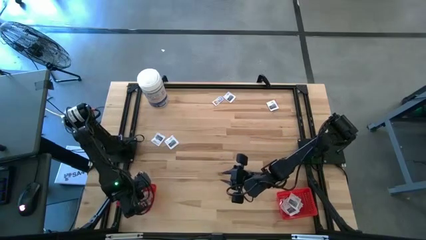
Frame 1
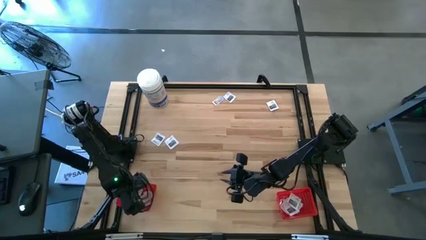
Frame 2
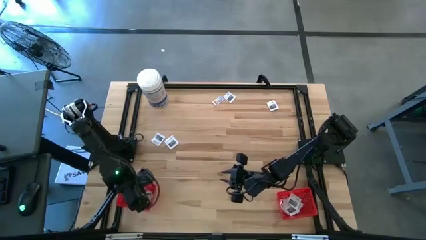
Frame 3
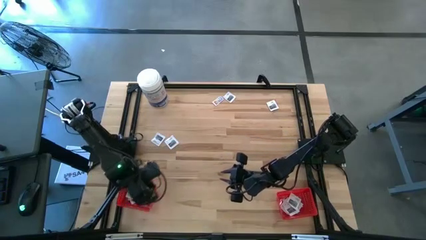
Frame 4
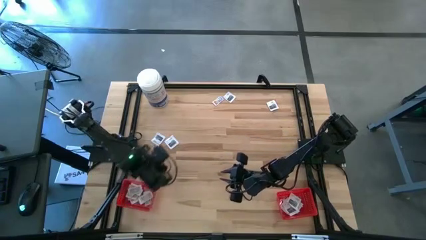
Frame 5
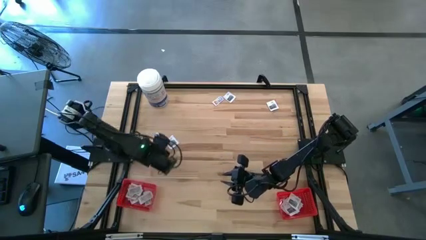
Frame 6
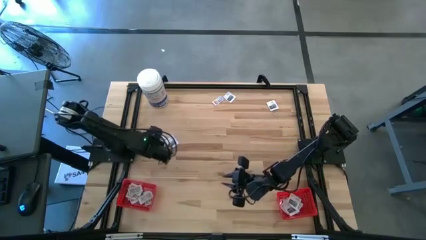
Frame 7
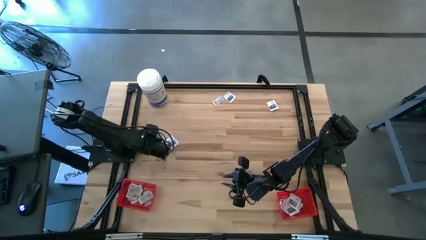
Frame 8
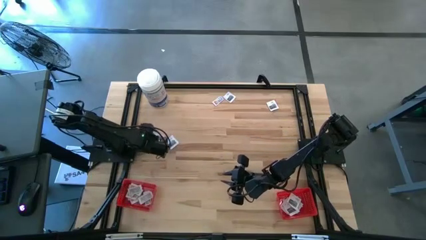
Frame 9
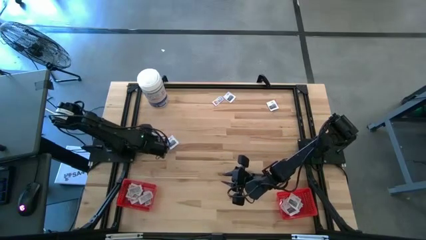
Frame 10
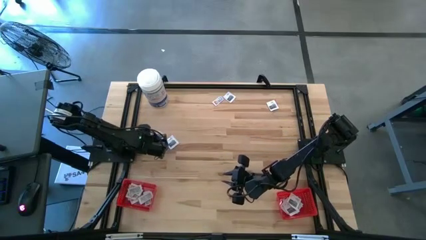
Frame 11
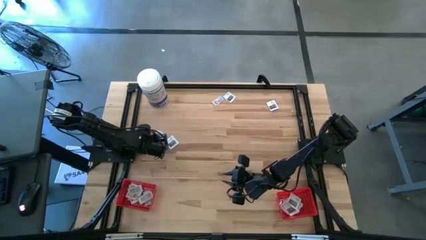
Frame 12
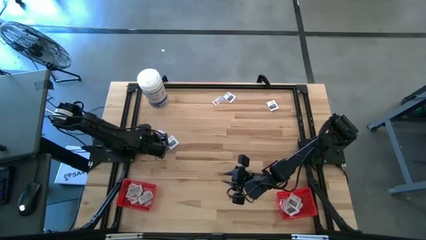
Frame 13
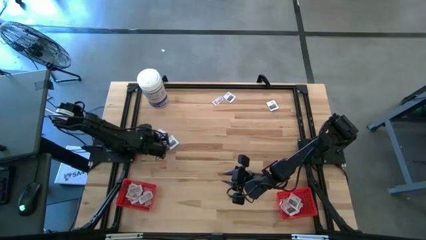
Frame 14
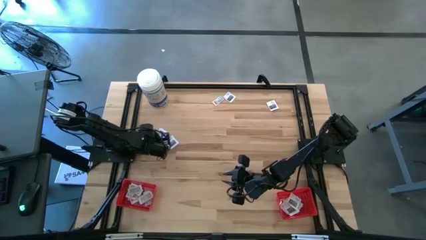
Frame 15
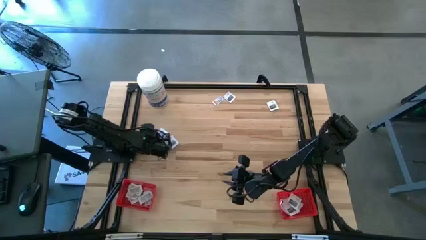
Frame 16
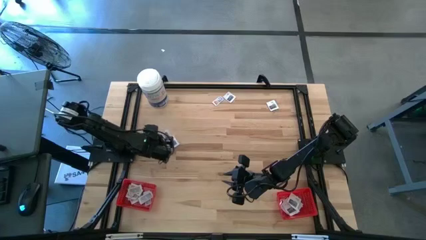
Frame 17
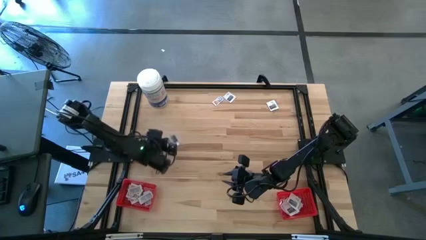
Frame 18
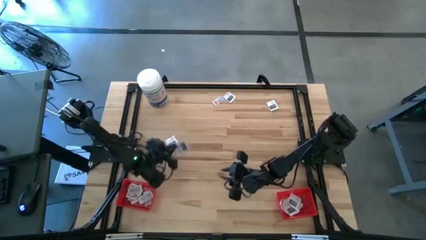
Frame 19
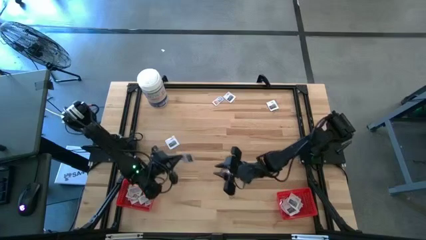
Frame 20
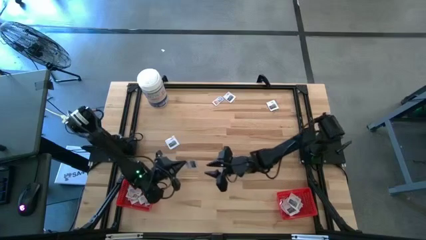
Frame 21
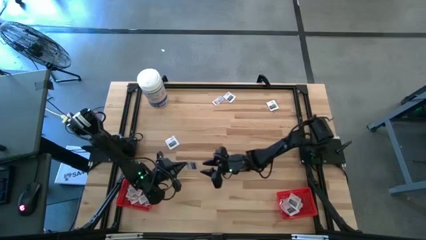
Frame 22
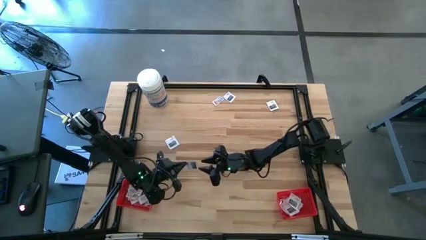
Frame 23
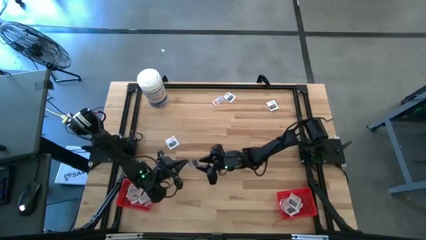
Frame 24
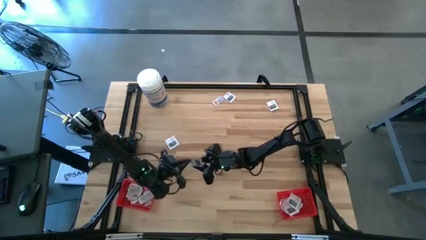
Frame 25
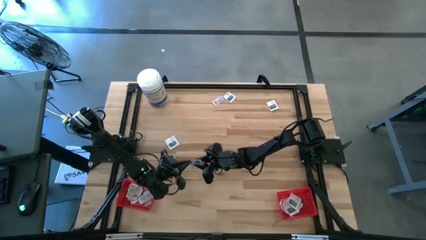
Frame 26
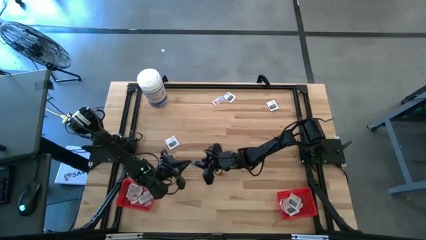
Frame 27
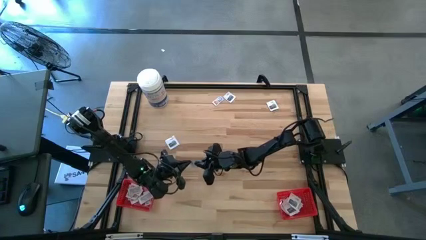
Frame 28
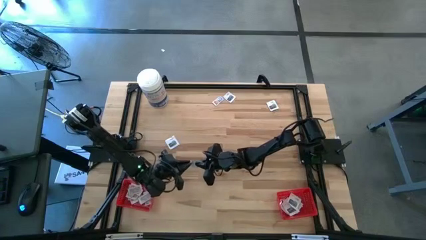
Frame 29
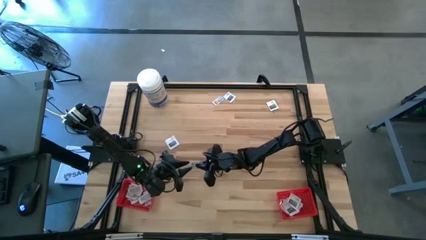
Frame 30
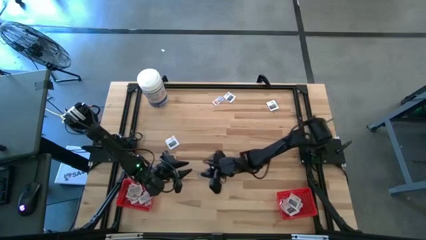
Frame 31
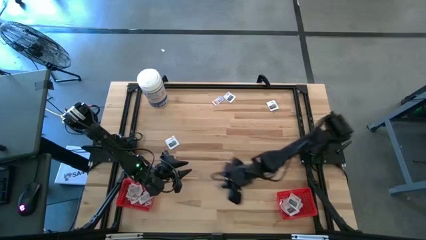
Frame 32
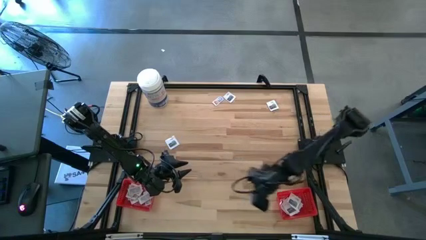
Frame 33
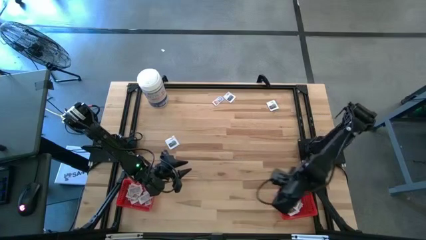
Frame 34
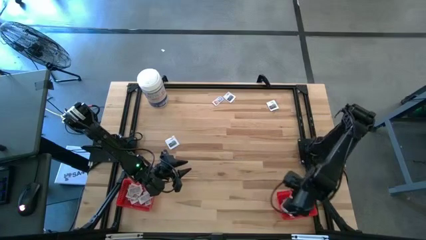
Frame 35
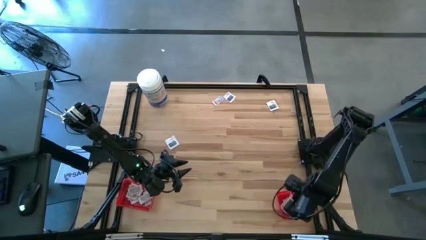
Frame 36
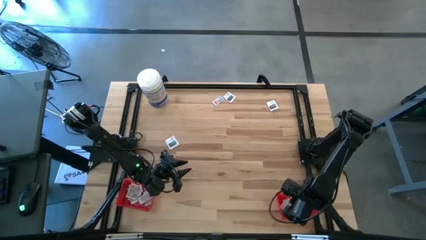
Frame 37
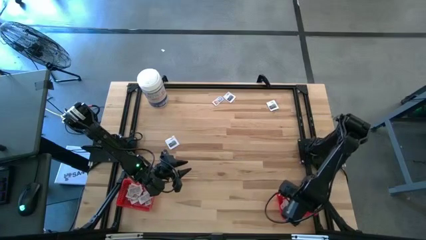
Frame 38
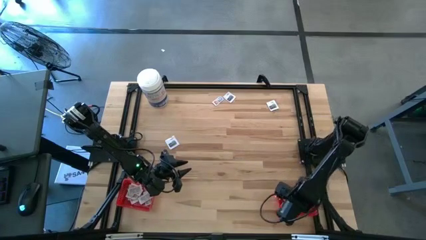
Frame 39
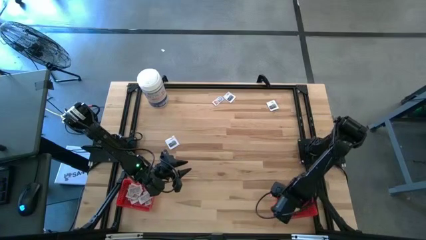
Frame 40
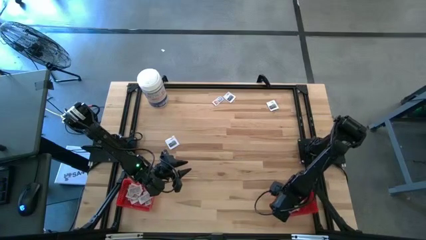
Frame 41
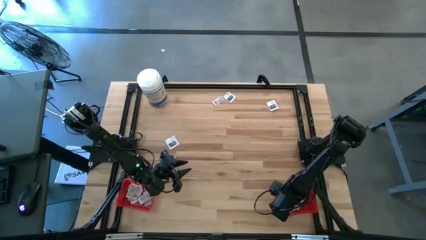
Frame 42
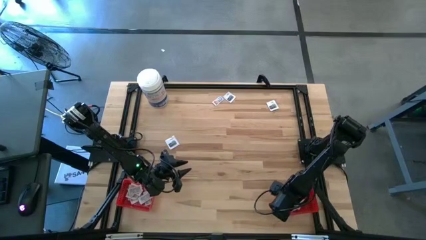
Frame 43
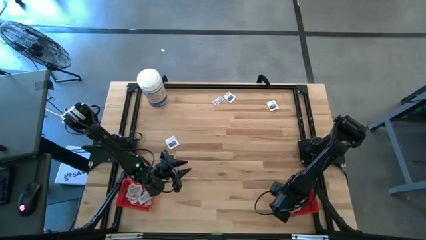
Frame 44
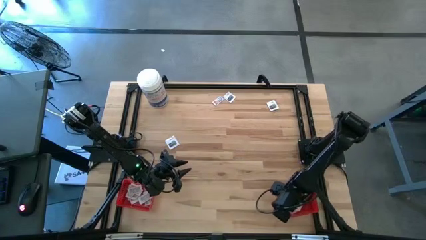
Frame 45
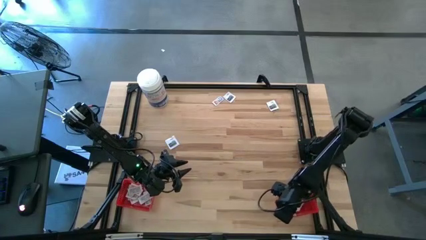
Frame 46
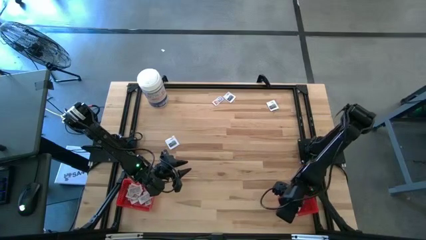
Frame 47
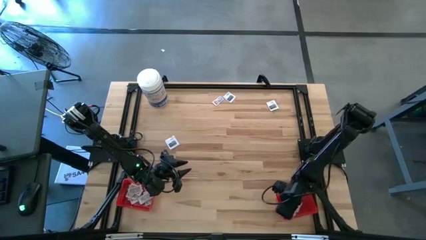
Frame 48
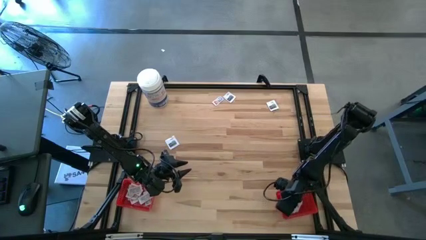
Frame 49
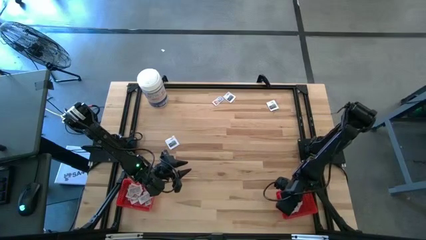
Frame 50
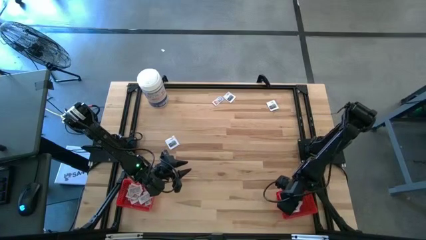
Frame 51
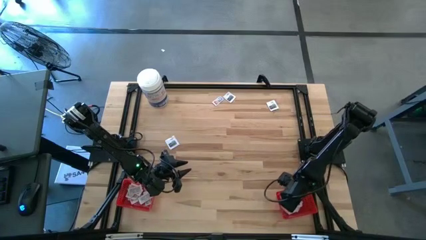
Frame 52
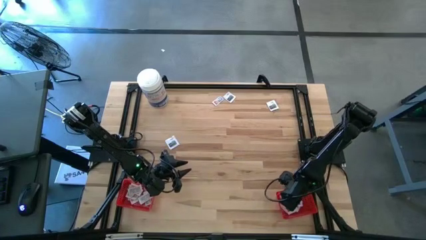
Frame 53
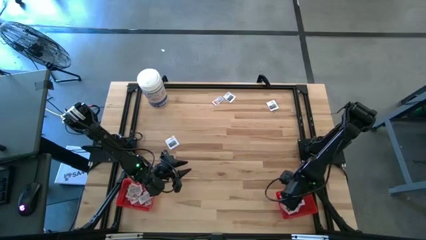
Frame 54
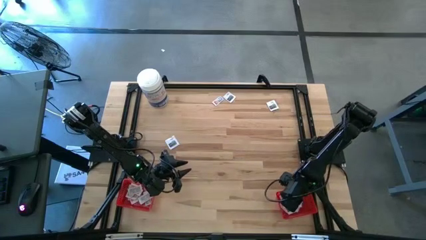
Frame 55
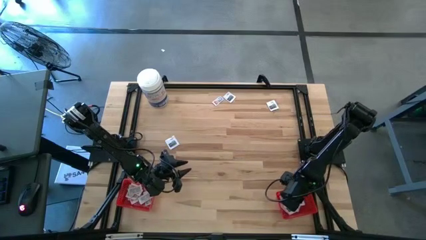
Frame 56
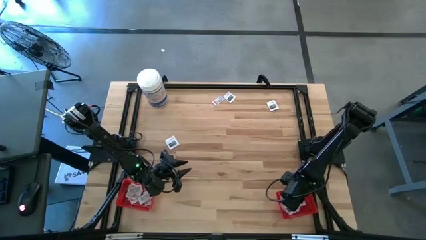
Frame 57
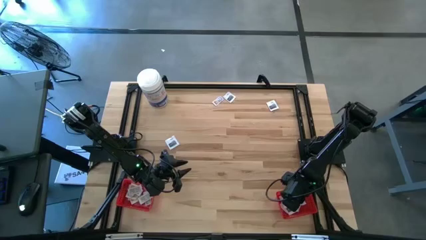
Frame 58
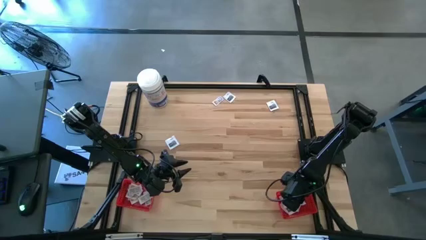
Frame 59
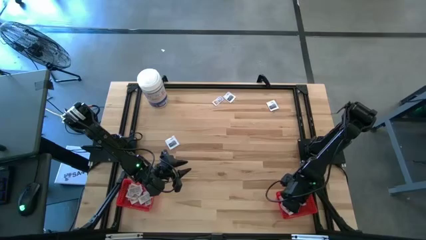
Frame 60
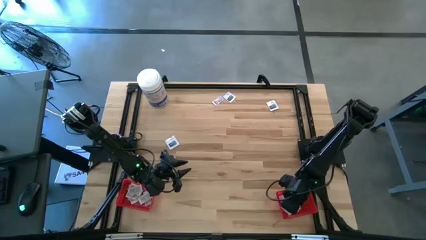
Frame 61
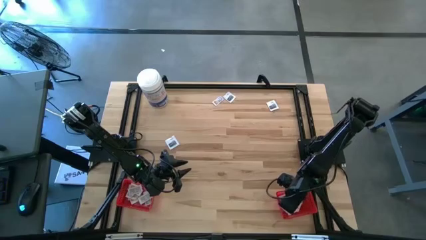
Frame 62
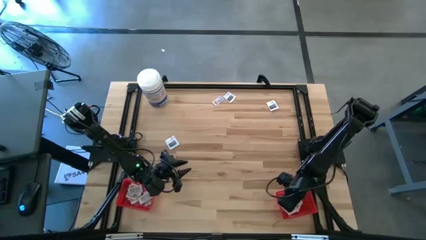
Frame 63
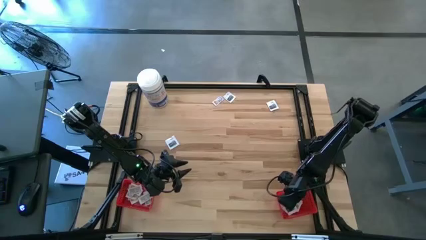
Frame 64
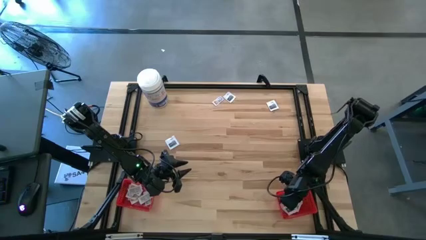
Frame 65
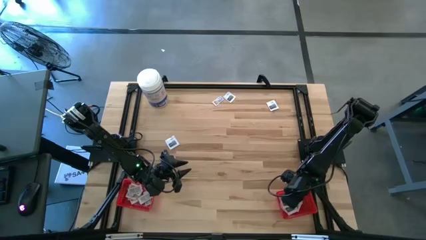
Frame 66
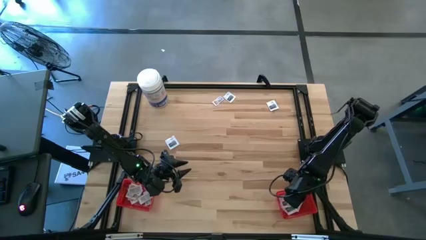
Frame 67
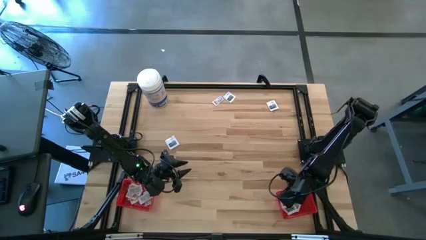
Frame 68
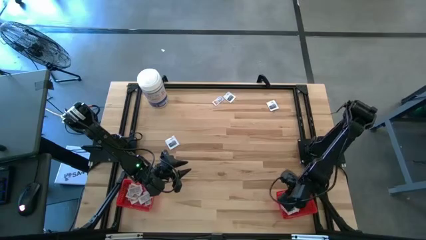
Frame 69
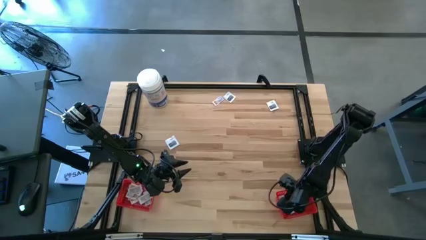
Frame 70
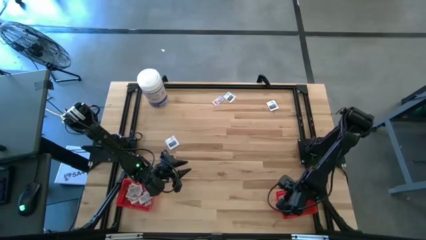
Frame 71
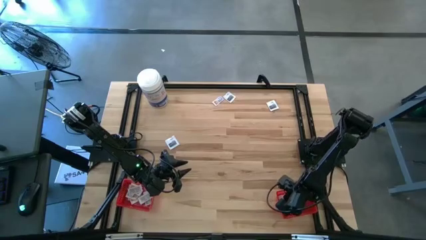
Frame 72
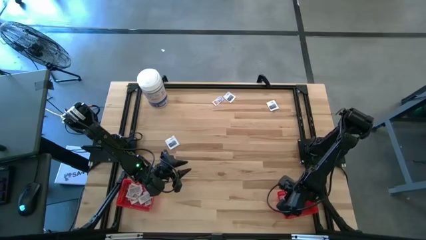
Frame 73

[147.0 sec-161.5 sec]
Task: Pick & Place First Aid Supplies
Put the towelette pack into the right red bin

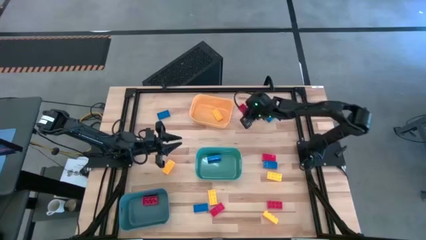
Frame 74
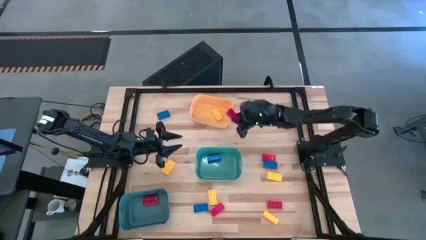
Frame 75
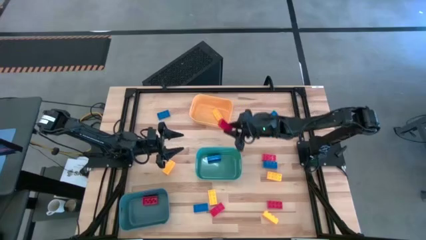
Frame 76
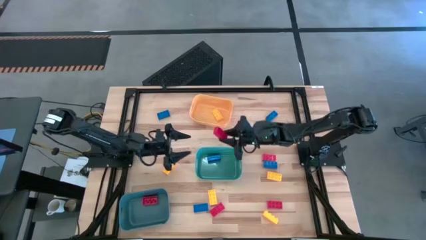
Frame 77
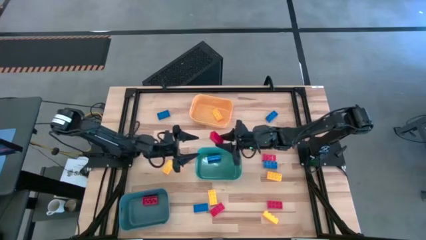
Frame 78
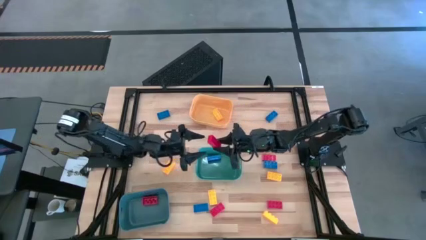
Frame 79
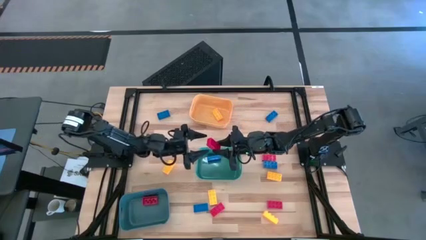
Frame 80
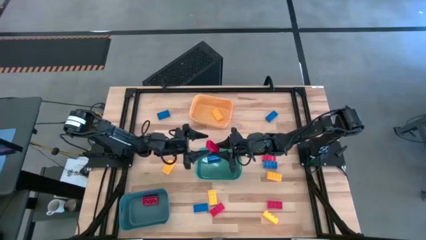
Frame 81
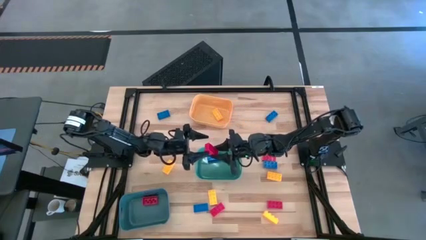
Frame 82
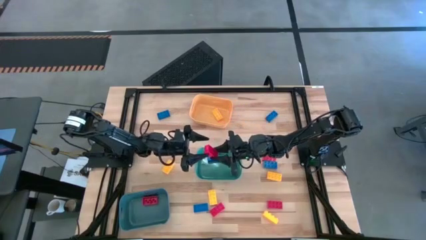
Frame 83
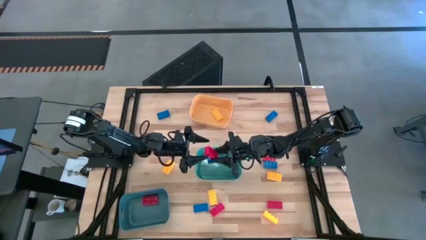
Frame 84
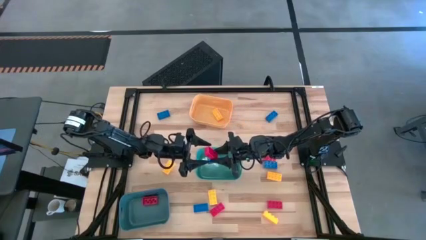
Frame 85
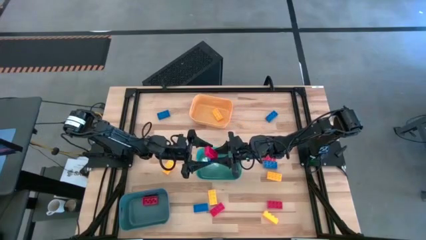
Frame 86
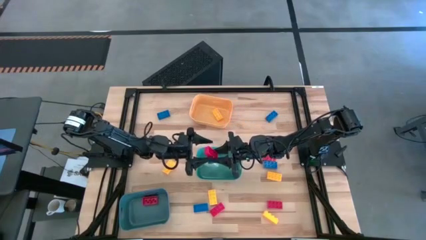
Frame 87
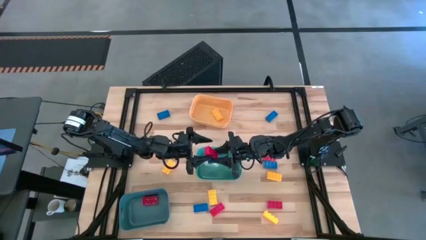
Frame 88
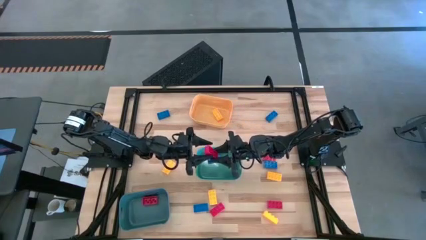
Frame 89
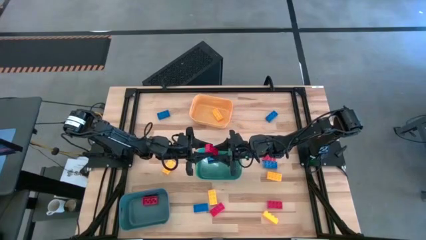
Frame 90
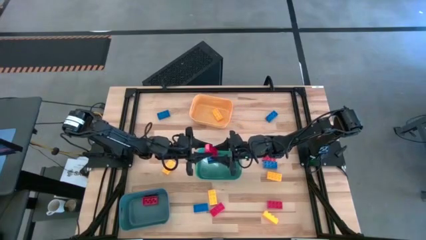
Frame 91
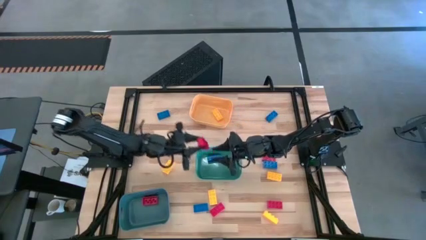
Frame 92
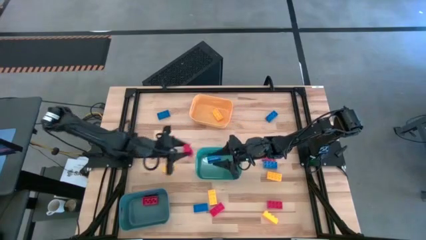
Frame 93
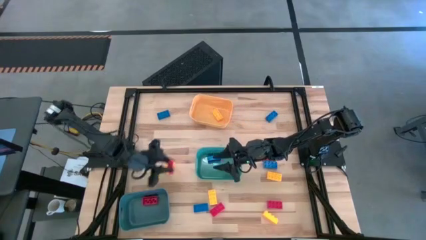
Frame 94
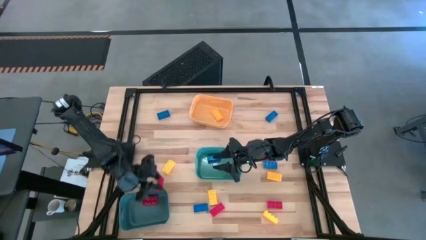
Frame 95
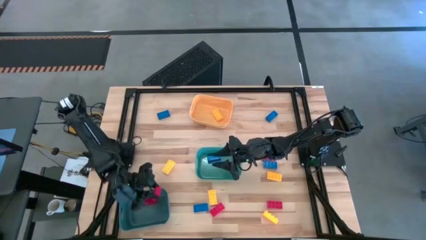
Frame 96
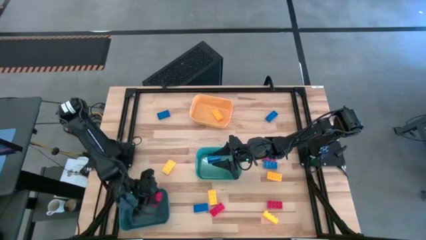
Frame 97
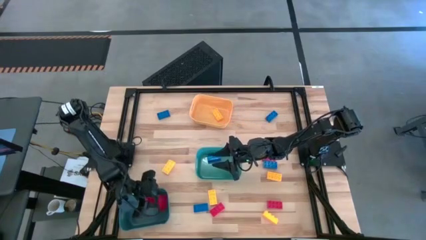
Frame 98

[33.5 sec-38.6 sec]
Task: Sort & place blocks by color
Put the red game piece into the blue bin
